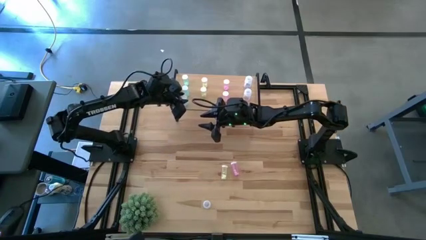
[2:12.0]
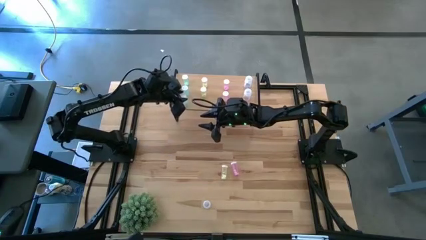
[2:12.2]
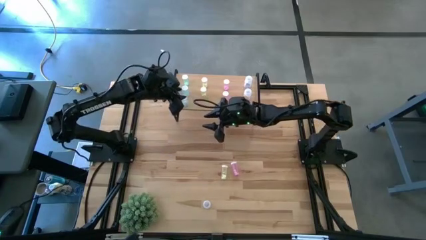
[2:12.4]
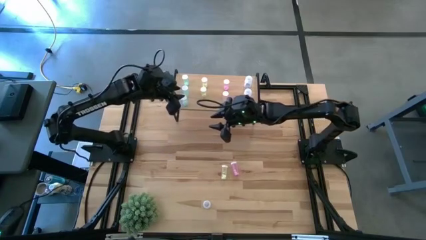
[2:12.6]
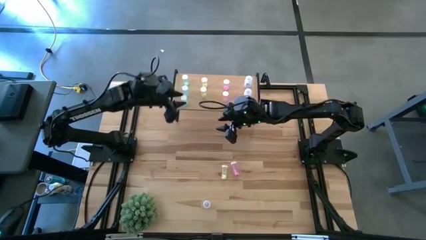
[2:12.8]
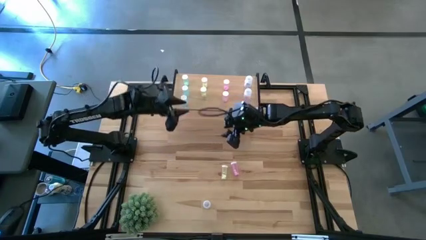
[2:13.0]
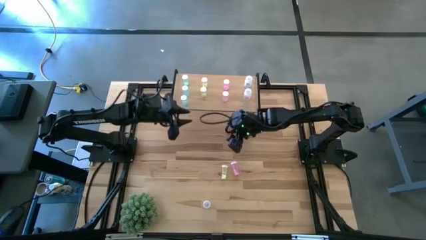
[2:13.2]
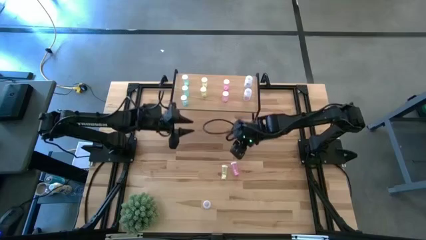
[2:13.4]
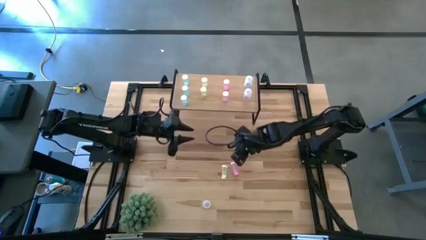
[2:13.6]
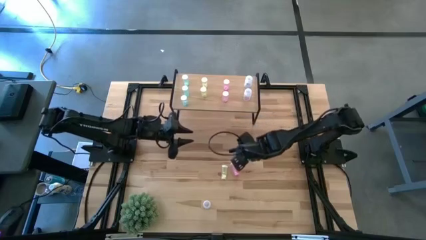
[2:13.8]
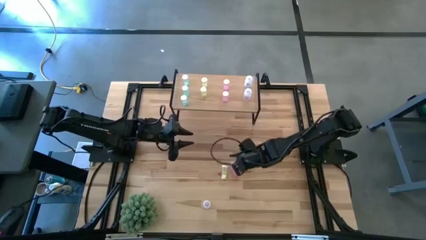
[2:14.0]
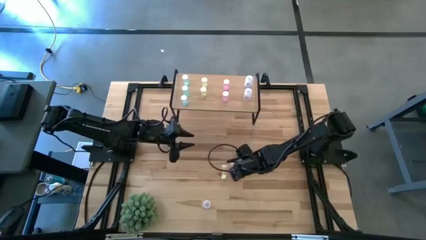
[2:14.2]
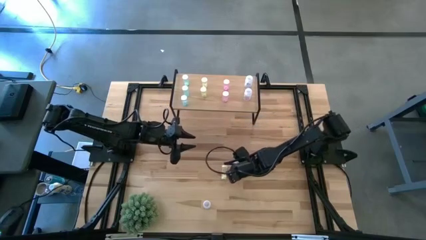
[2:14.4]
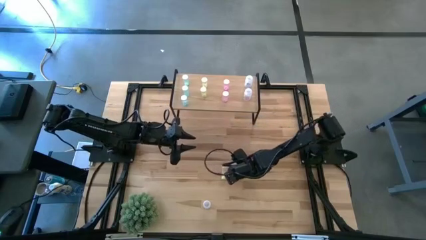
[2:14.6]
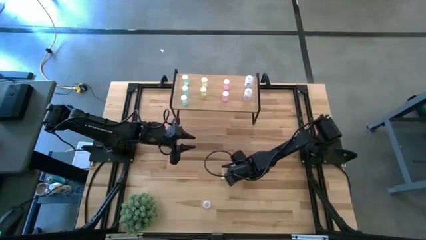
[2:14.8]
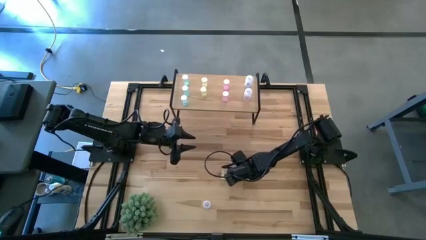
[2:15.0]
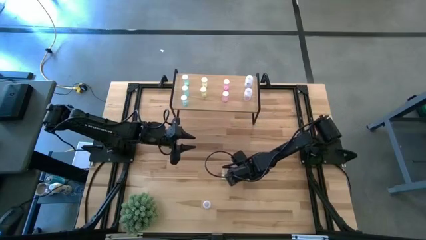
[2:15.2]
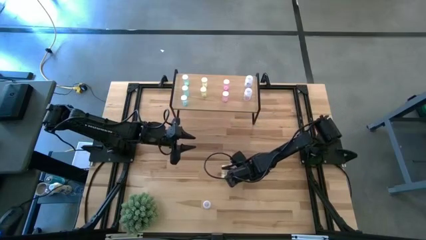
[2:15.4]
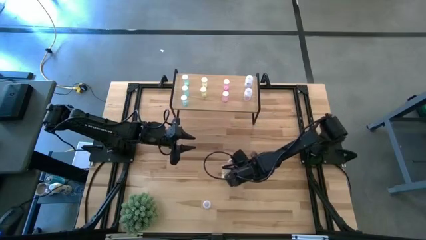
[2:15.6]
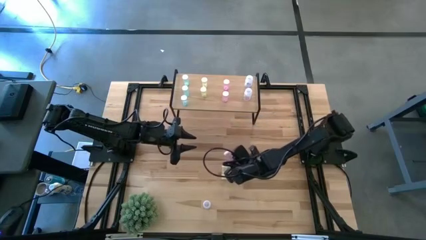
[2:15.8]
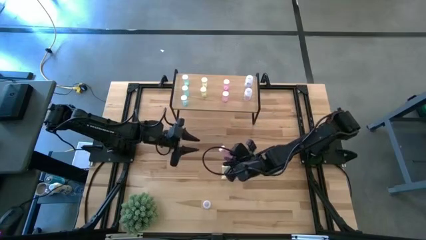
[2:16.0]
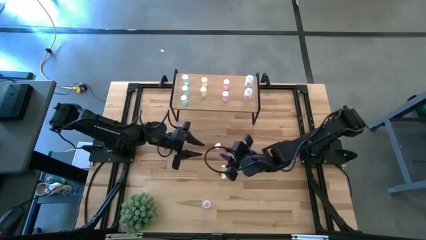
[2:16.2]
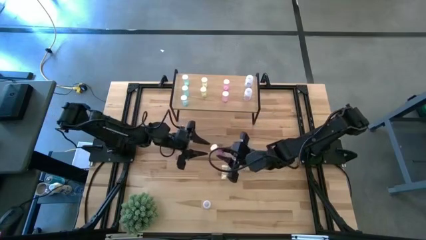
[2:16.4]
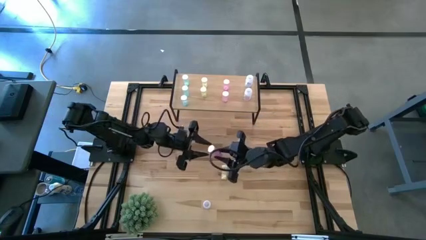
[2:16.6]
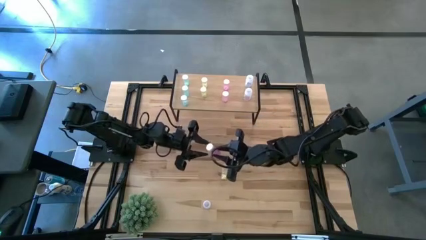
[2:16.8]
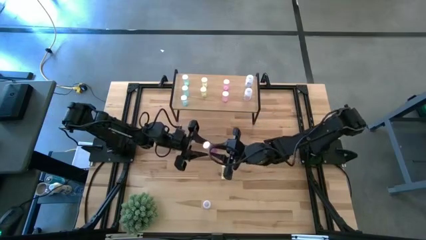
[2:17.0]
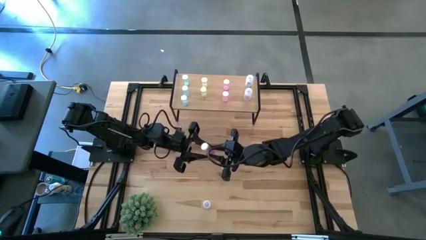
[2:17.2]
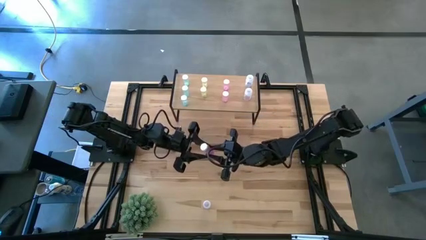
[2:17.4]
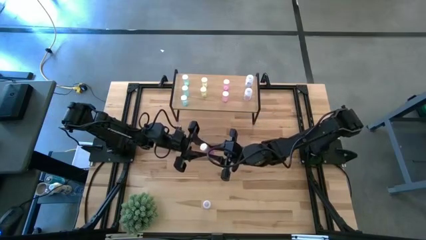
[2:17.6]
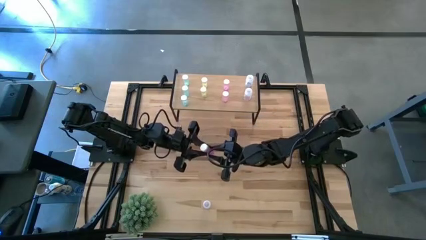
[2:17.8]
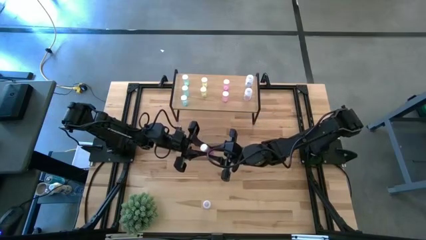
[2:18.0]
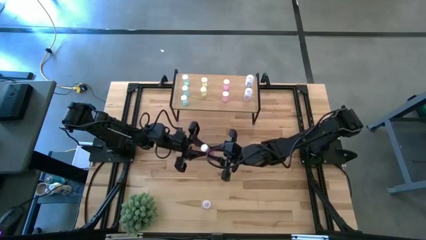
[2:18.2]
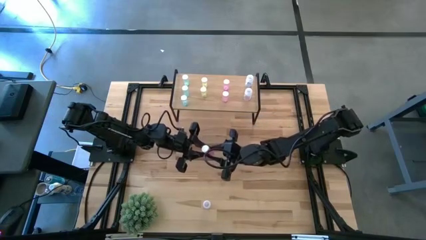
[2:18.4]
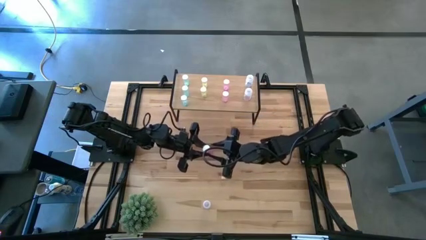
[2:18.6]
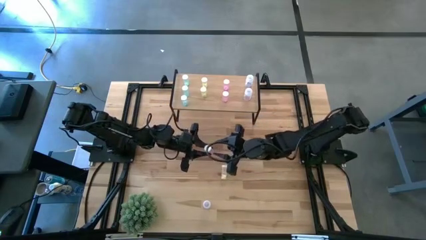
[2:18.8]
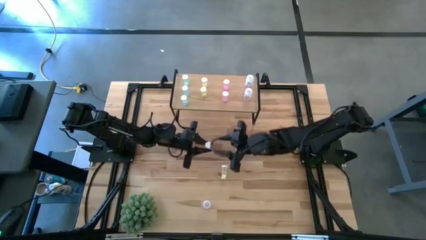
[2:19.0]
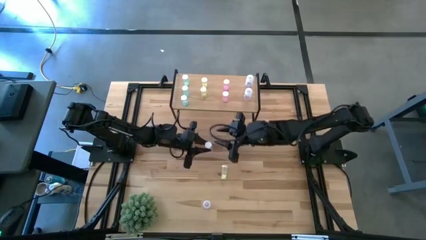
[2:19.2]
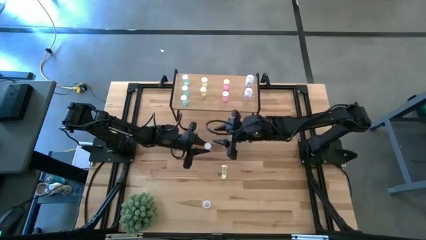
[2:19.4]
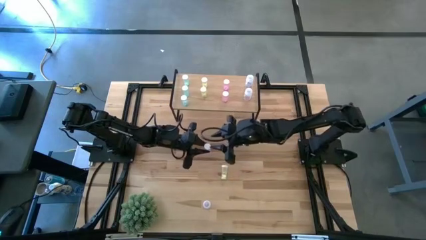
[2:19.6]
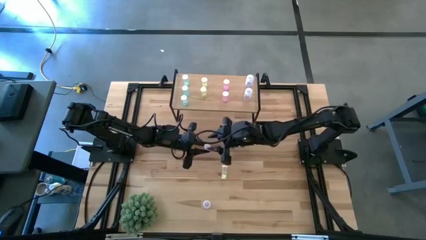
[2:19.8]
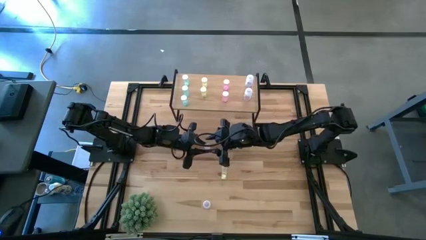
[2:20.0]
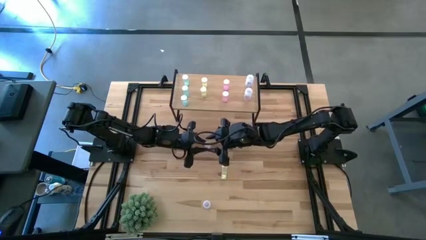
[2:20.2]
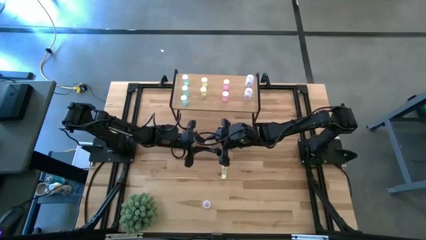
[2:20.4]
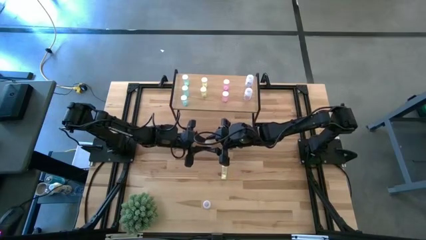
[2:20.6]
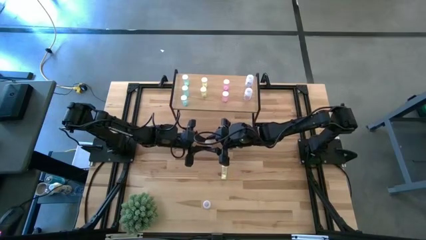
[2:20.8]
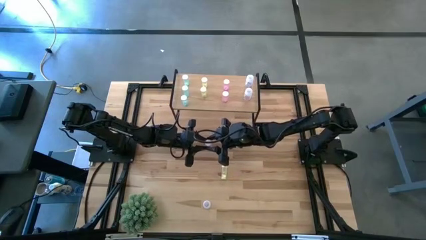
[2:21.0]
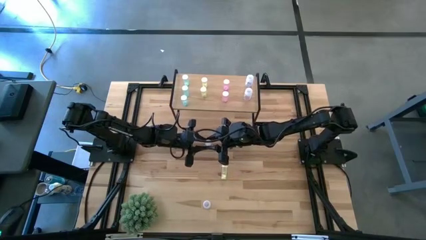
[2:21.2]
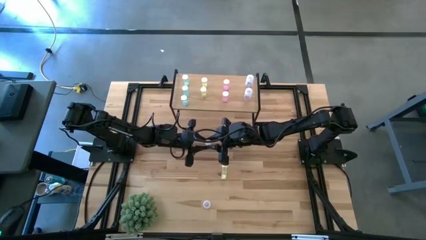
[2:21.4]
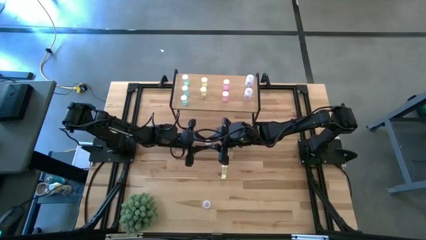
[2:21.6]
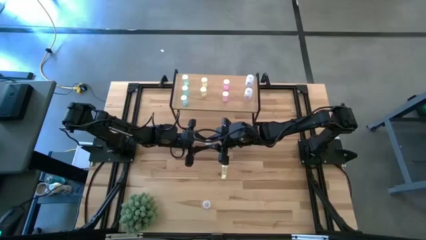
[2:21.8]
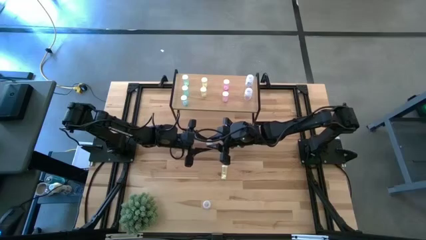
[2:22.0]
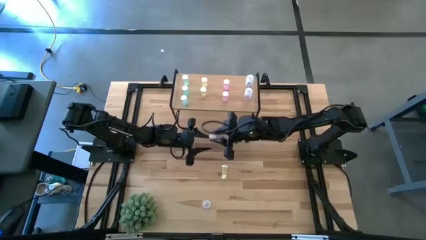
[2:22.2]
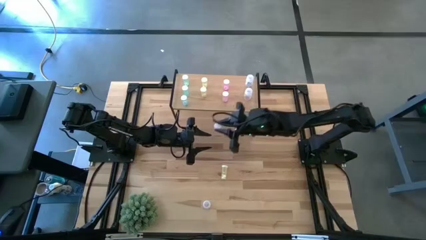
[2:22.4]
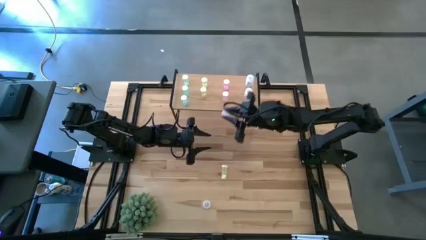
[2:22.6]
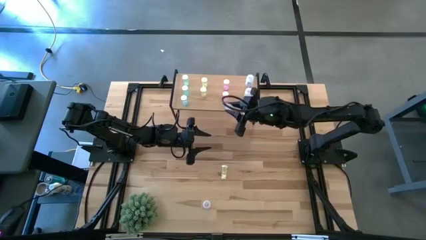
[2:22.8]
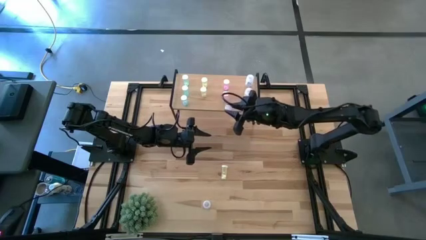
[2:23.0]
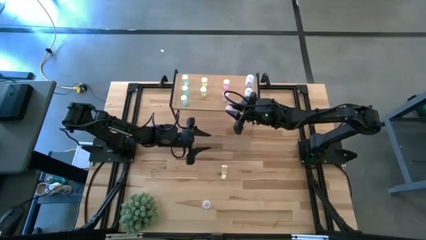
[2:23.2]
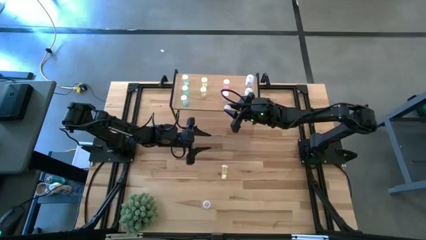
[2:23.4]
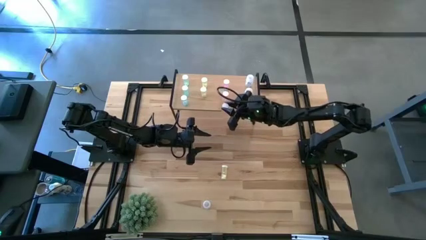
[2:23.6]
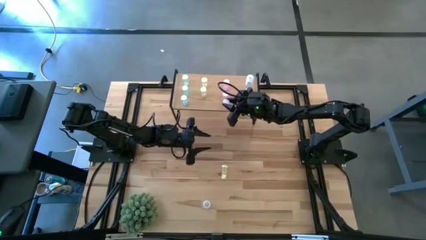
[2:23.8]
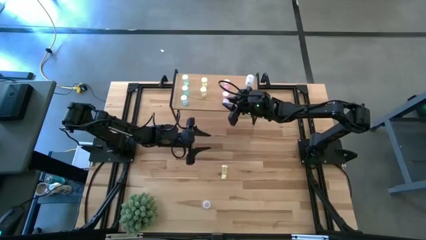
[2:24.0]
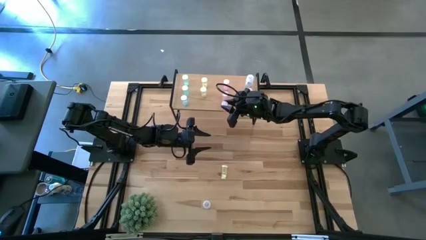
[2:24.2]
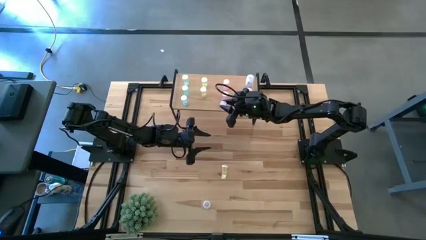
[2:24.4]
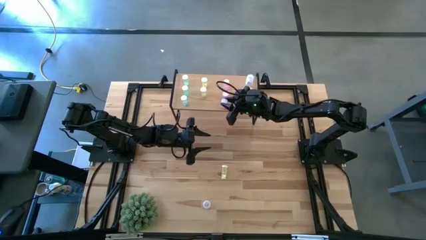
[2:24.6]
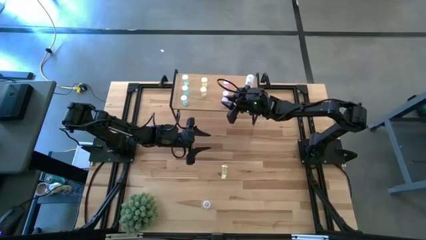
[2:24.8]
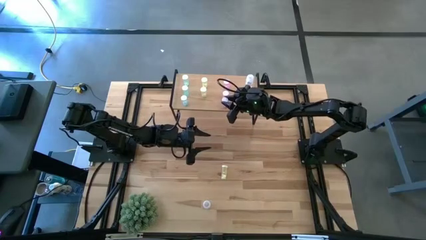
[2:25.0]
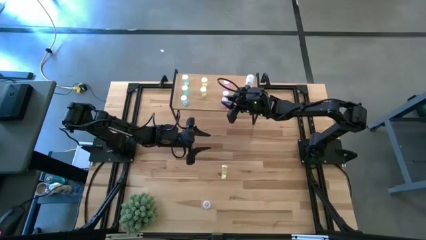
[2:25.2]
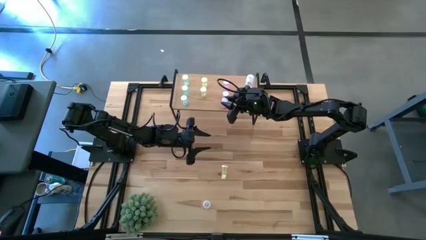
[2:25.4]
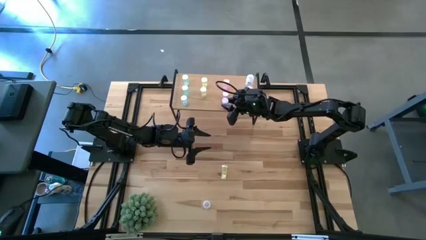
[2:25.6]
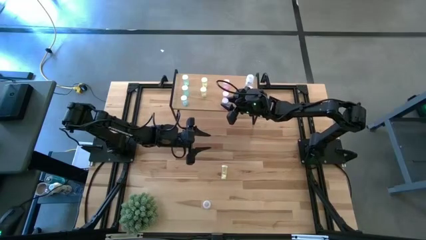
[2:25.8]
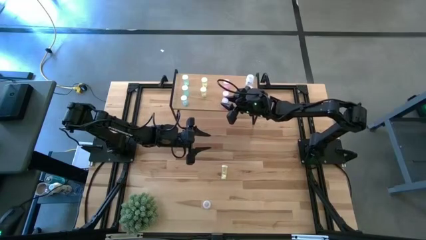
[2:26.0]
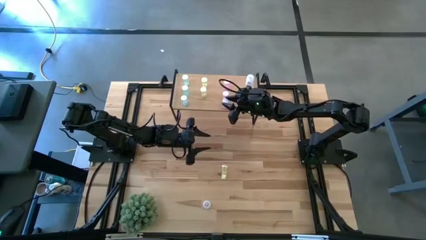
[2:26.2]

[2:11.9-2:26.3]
Task: Pick and place medicine bottles onto shelf by color
Put the pink pill bottle on the shelf aligned with the other pink pill bottles

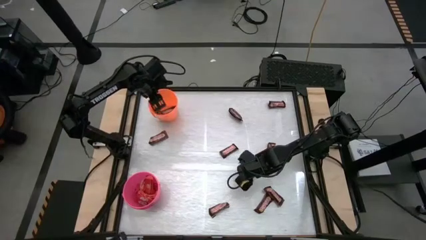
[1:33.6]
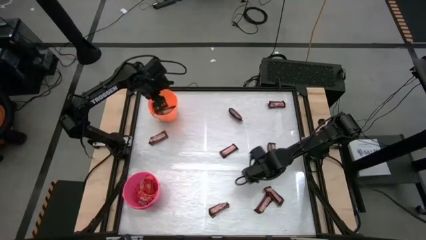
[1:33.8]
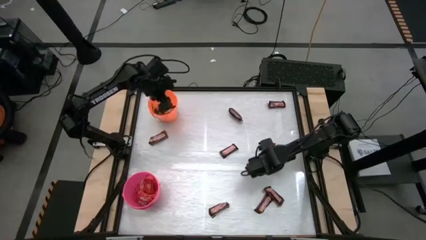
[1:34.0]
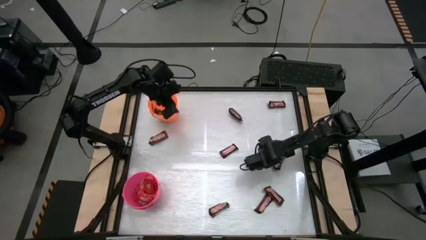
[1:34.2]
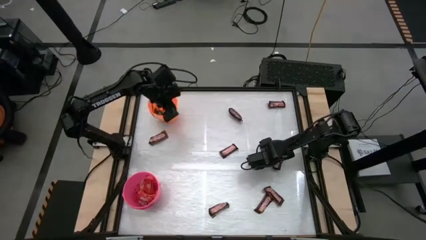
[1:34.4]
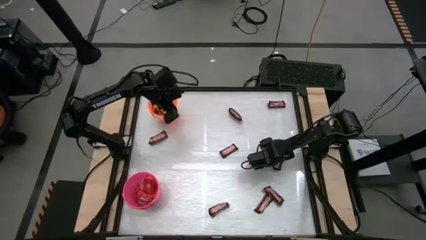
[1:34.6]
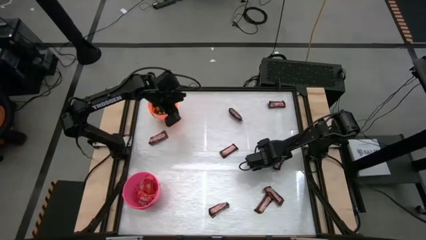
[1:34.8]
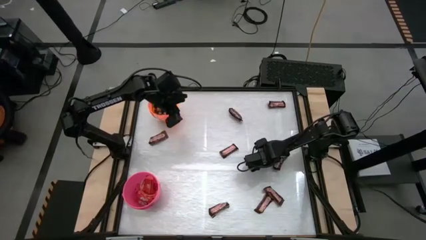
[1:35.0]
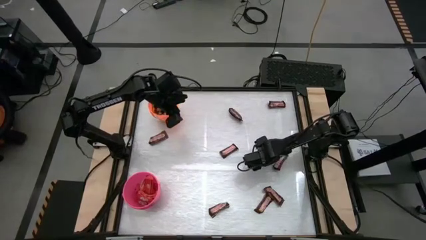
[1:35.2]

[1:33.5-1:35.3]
Task: Sort candy by brand, put in halloween buckets
Put the brown chocolate bar into the orange bucket

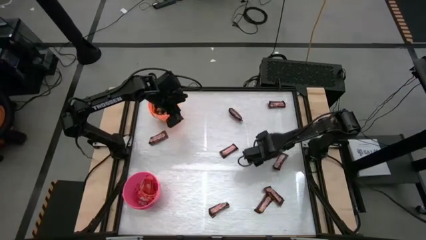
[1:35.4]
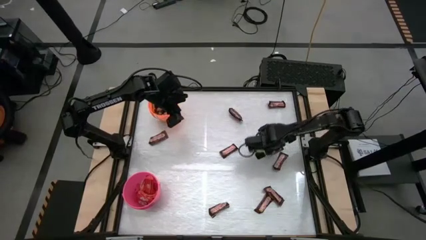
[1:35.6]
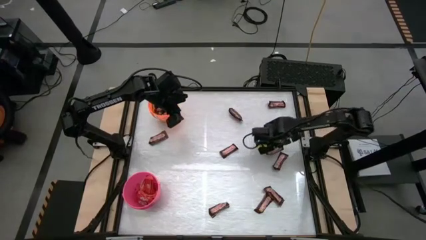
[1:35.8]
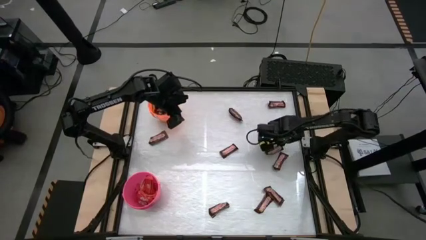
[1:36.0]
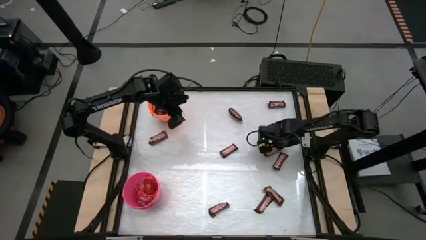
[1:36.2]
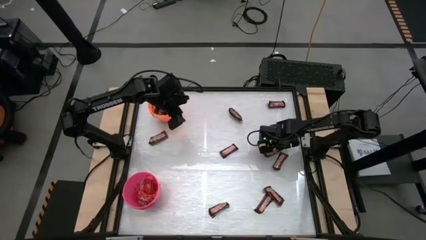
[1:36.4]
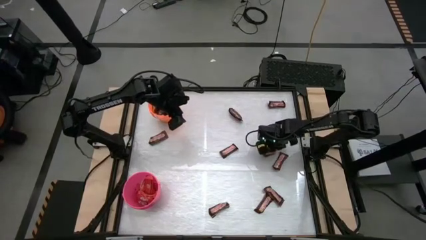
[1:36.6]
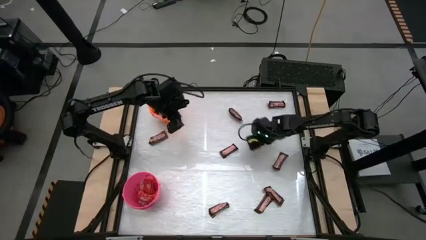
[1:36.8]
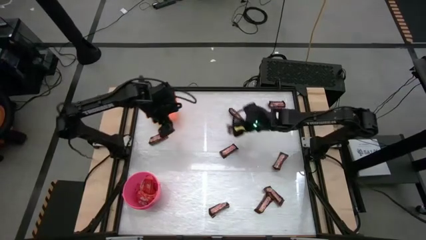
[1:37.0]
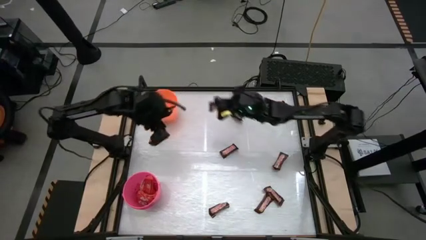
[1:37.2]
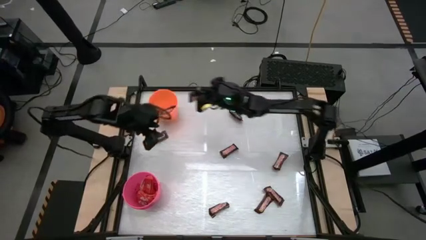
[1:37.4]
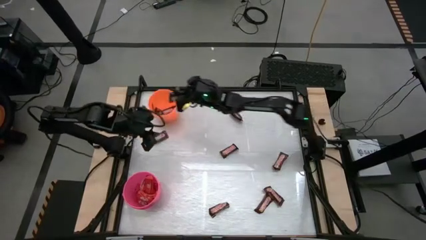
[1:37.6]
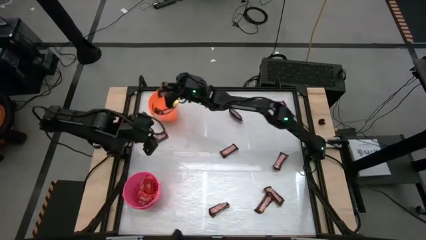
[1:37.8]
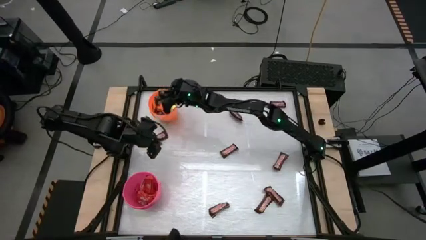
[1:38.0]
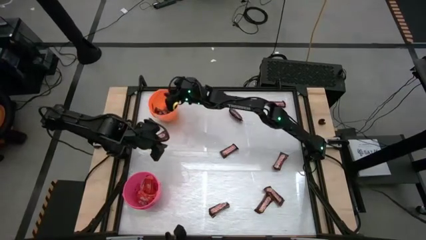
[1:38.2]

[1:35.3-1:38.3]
Put the brown chocolate bar into the orange bucket
